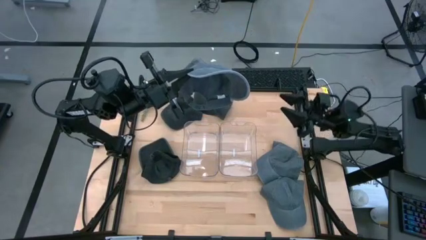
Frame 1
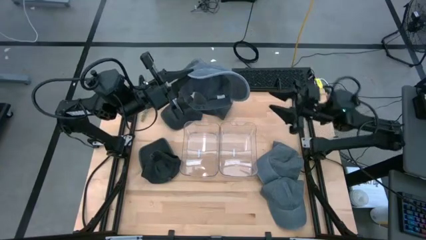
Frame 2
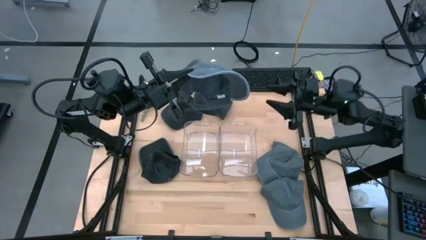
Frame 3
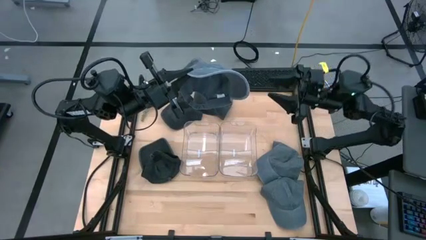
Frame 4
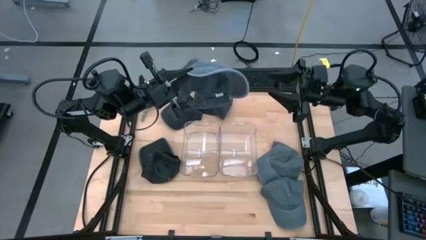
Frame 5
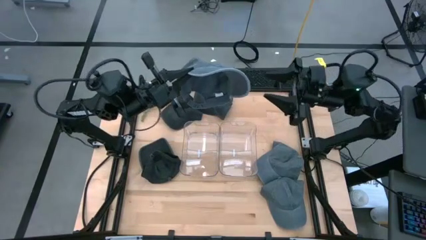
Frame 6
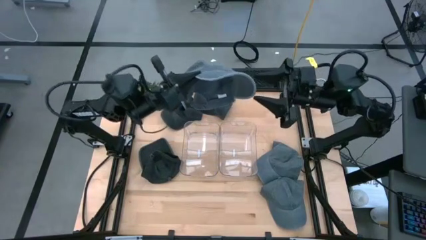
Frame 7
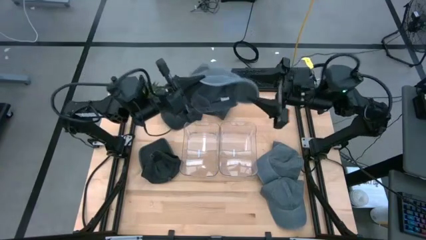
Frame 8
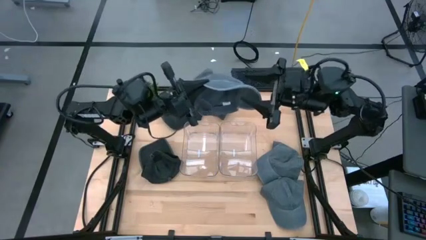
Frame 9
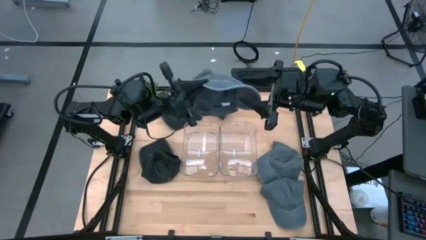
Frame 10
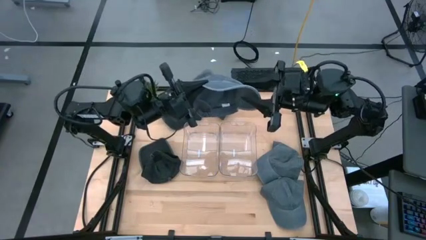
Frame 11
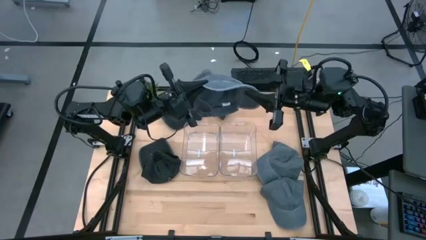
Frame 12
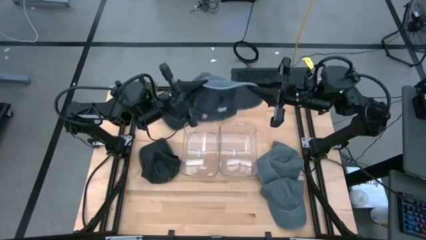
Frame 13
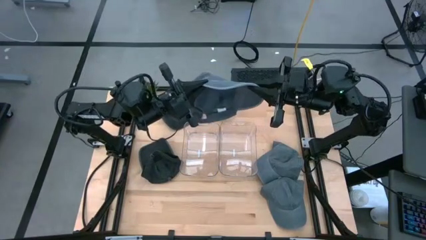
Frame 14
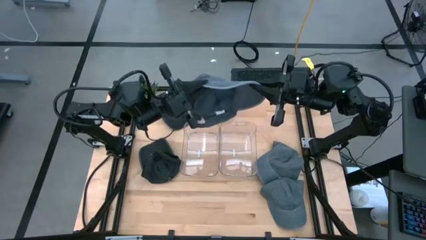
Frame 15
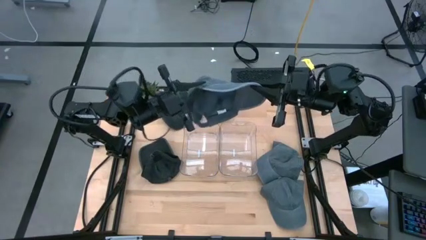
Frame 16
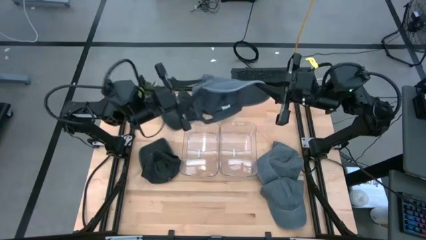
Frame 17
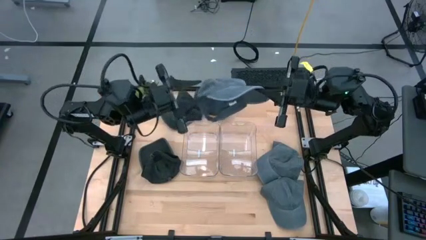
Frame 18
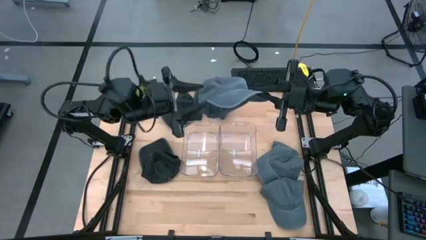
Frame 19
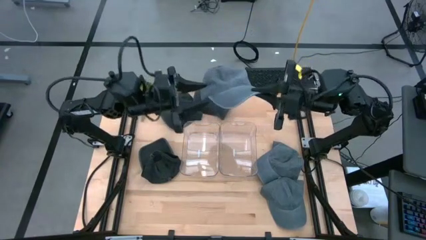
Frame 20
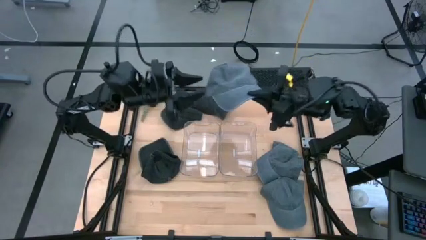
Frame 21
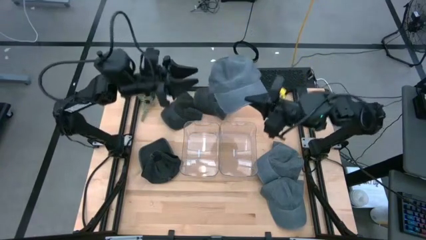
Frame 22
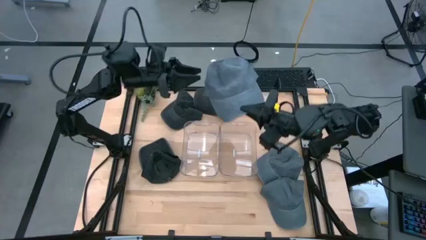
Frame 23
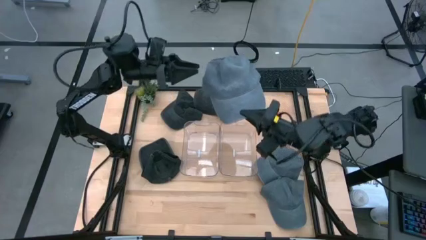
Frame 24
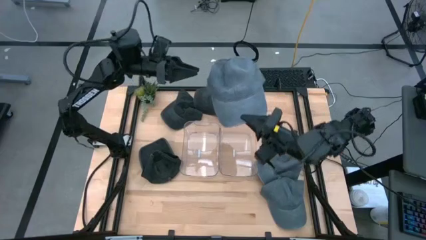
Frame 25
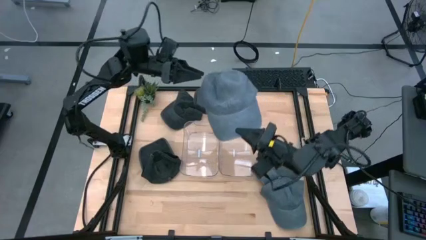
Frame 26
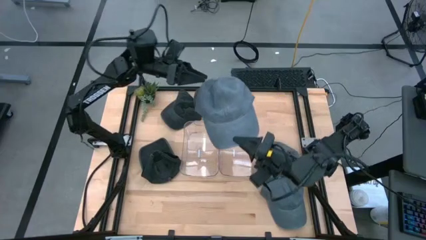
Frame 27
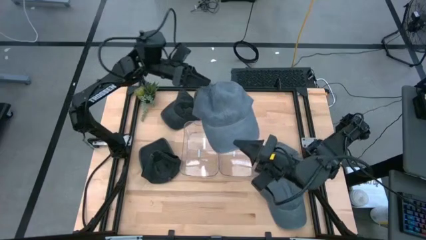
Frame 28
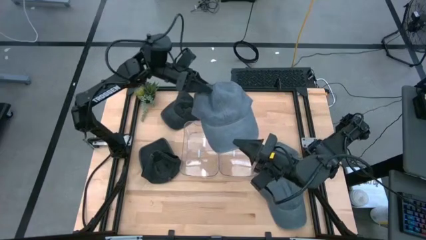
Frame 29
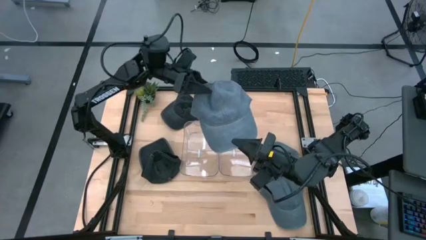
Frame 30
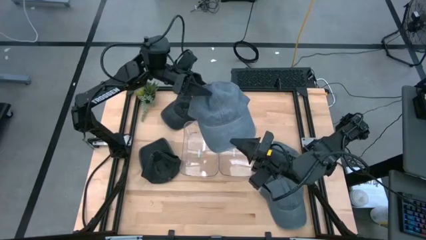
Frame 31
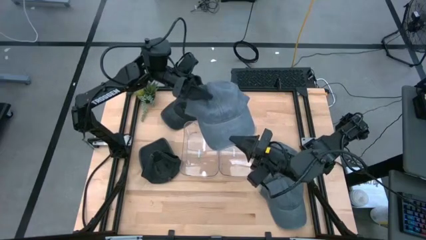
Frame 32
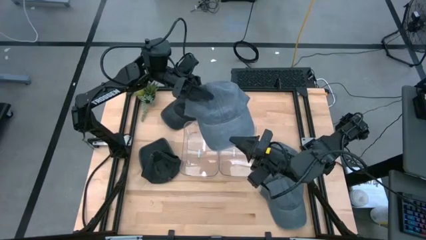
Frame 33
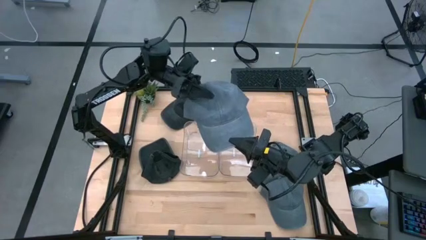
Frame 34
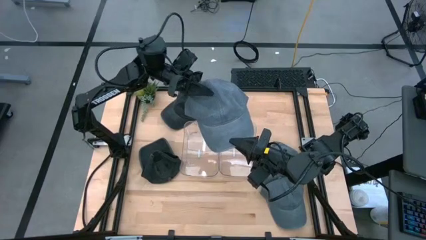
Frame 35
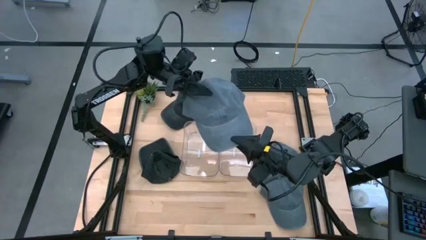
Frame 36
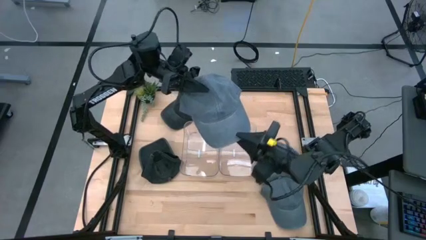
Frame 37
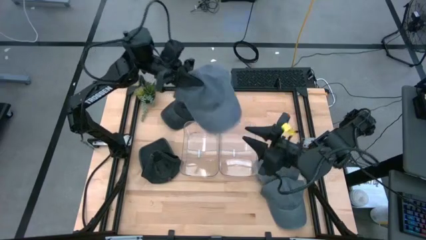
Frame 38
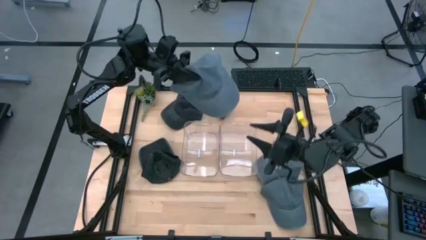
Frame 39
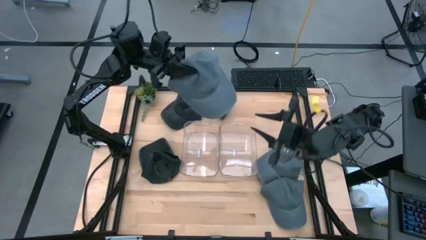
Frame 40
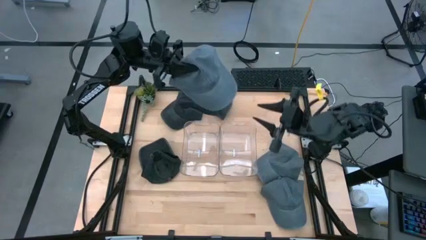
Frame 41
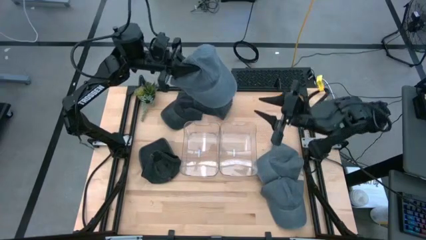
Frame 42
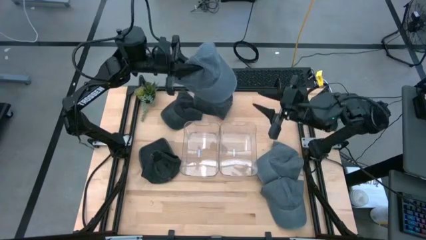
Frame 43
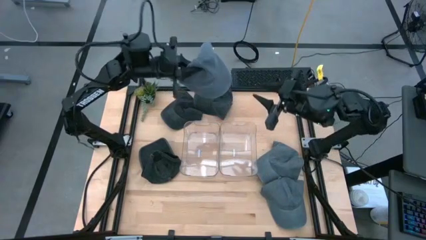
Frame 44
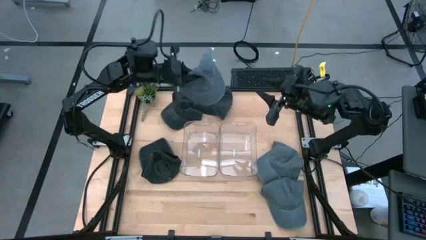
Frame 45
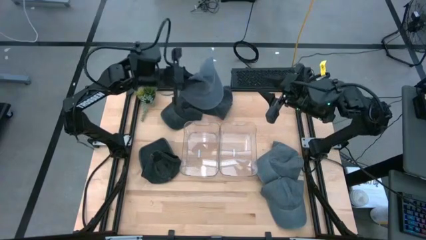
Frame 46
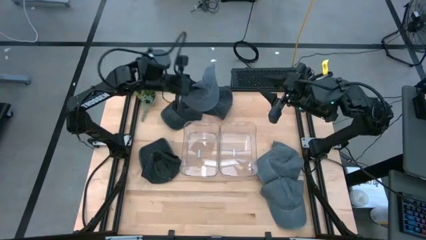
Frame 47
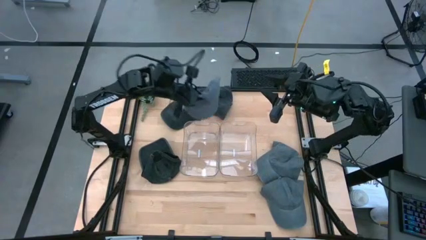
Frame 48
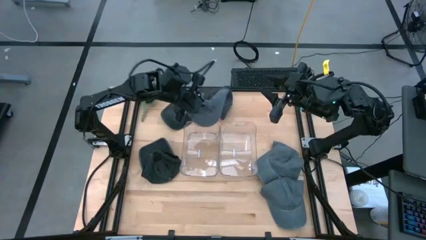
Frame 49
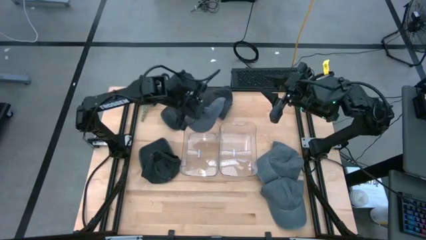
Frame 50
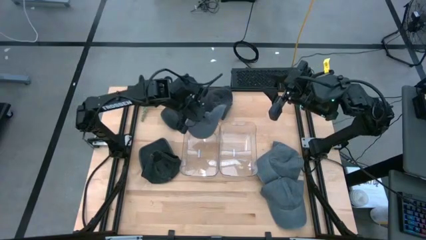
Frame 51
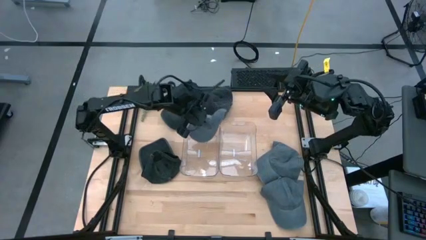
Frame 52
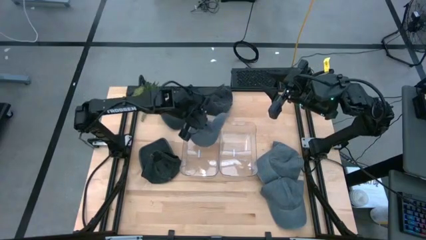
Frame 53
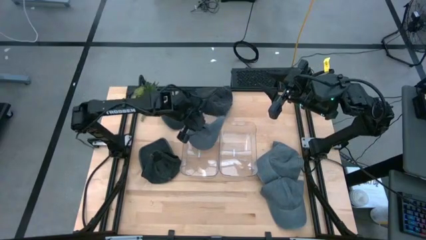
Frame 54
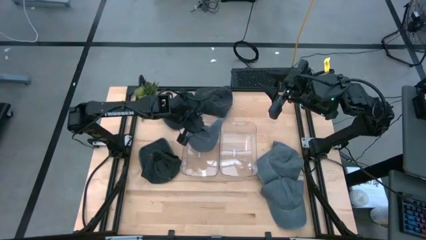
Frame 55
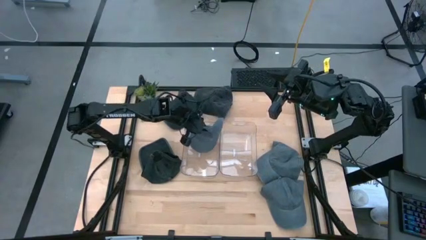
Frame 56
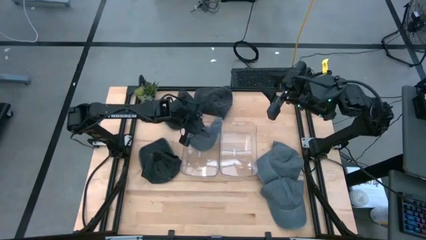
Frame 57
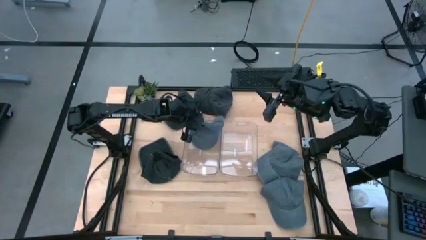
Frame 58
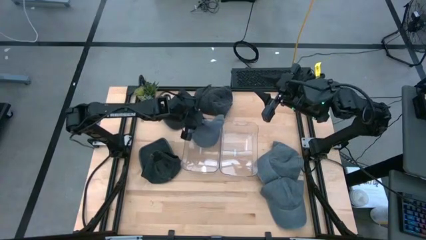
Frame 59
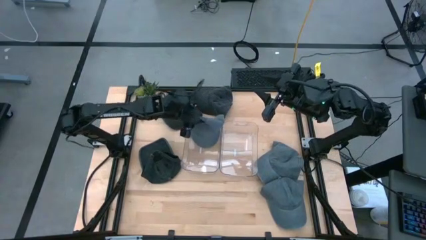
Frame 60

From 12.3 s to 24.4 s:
Task: Pick & Place hat
Put the bottom left gray cap into the left transparent bin
